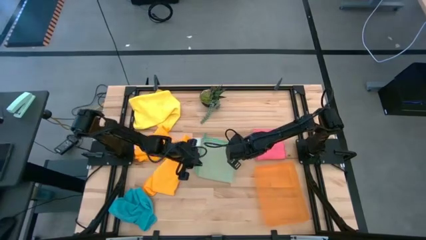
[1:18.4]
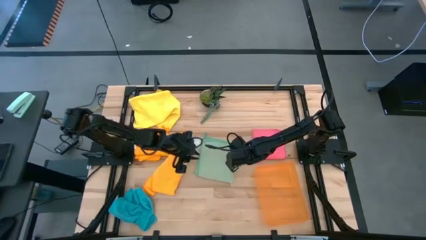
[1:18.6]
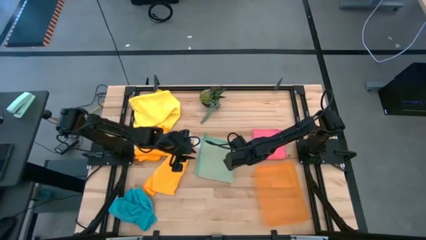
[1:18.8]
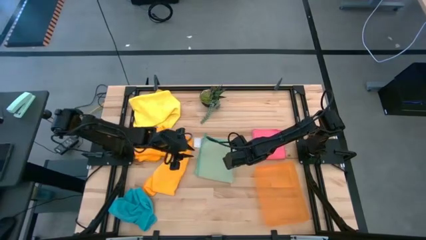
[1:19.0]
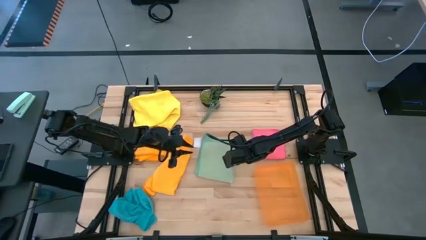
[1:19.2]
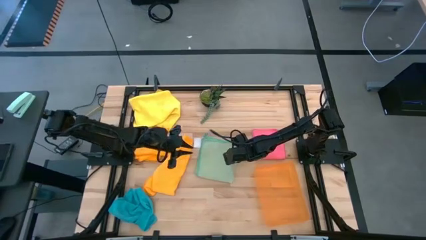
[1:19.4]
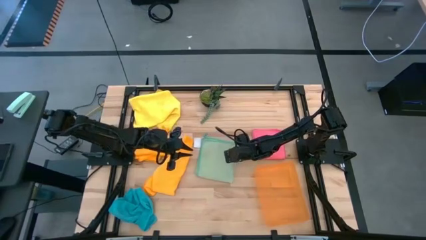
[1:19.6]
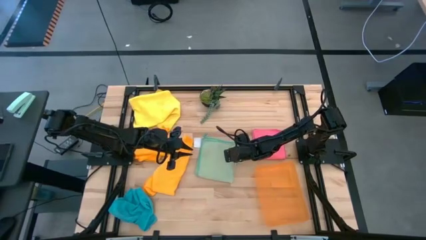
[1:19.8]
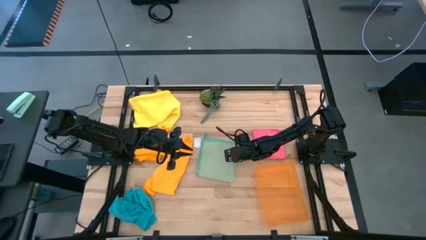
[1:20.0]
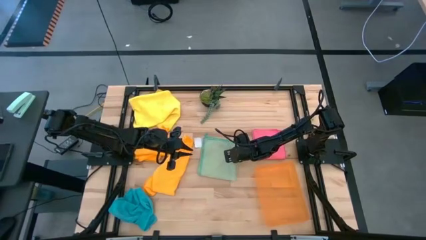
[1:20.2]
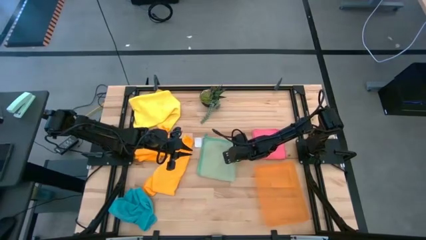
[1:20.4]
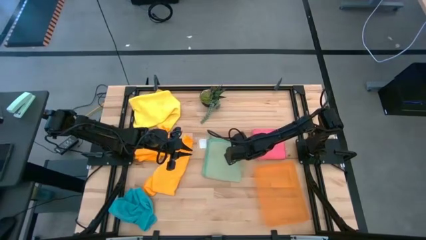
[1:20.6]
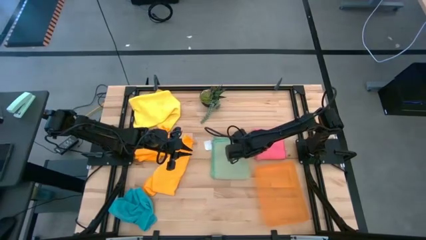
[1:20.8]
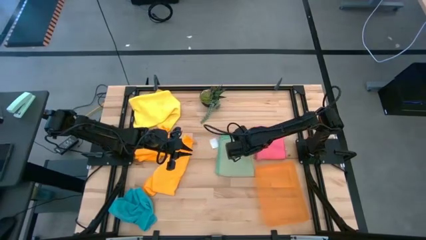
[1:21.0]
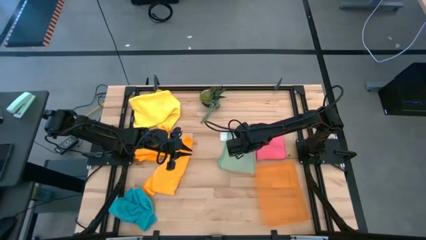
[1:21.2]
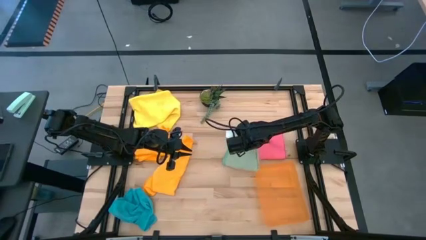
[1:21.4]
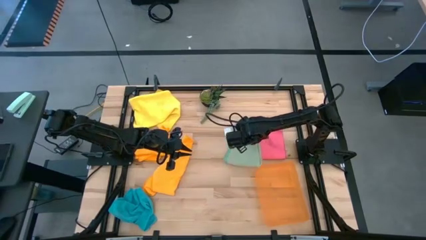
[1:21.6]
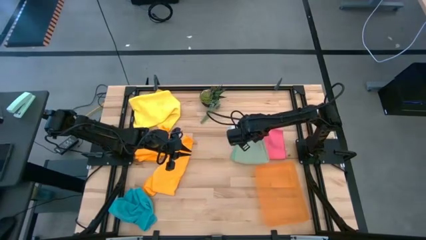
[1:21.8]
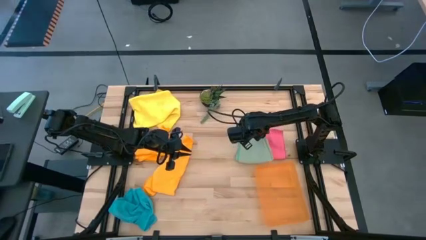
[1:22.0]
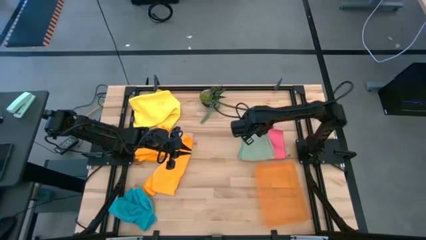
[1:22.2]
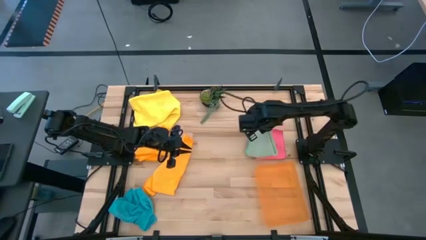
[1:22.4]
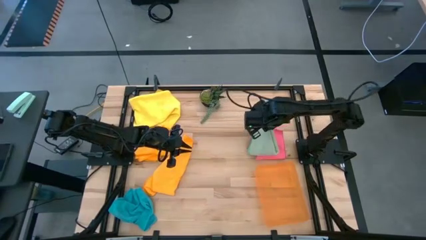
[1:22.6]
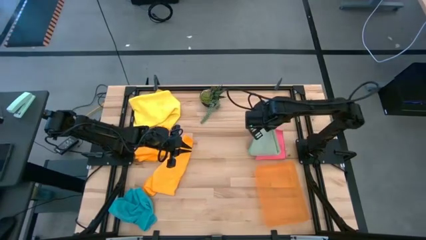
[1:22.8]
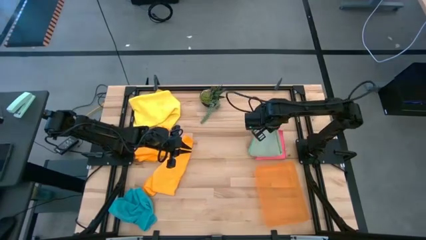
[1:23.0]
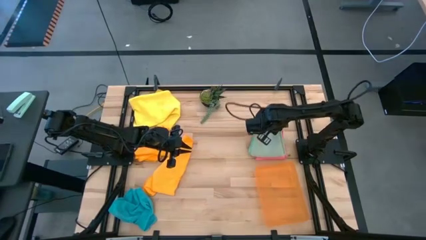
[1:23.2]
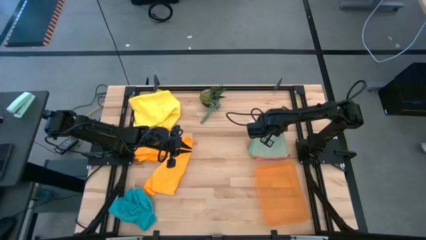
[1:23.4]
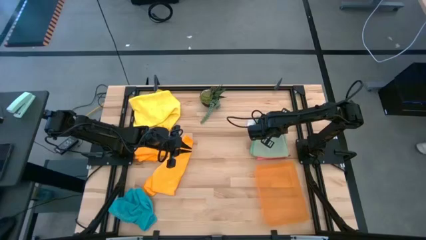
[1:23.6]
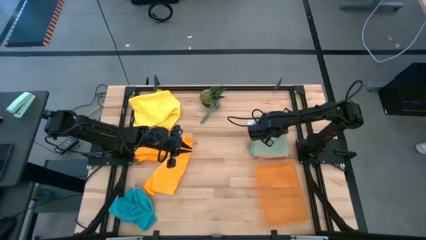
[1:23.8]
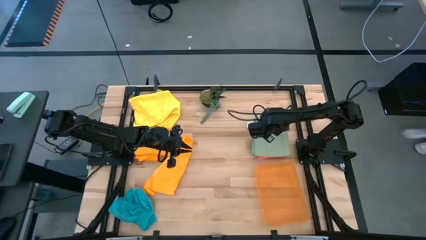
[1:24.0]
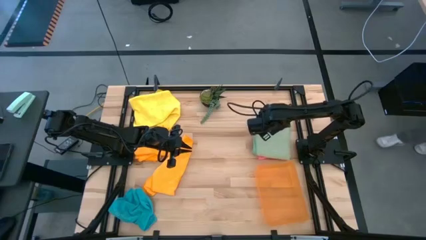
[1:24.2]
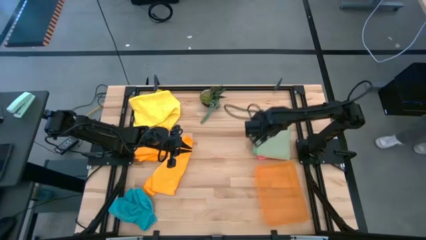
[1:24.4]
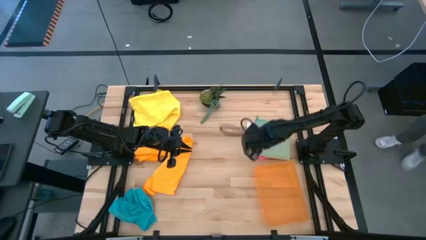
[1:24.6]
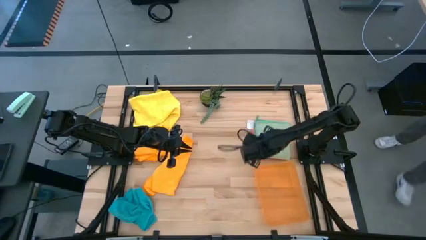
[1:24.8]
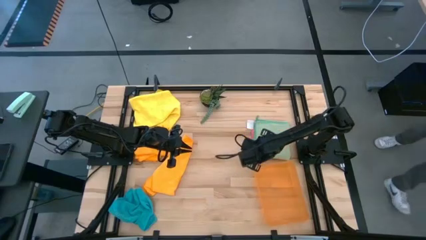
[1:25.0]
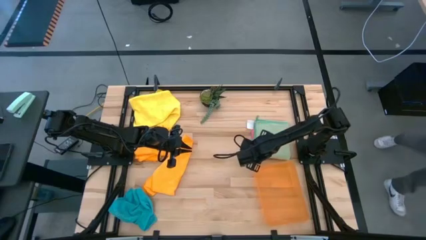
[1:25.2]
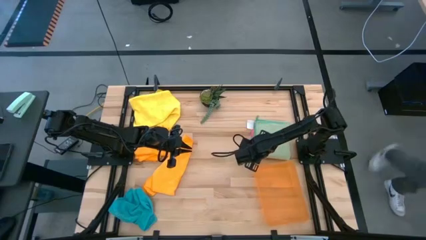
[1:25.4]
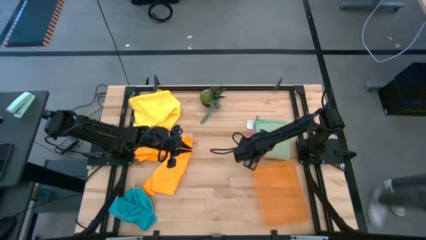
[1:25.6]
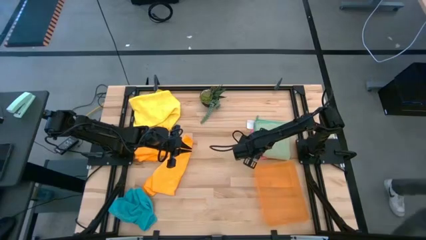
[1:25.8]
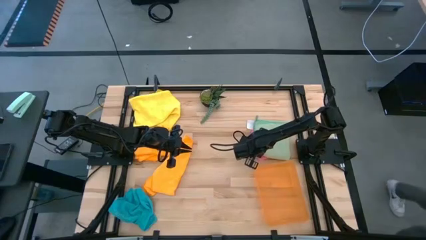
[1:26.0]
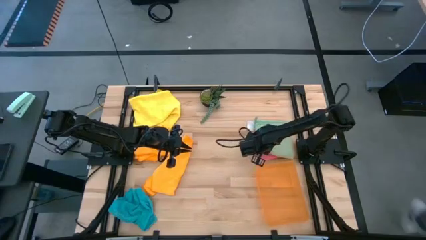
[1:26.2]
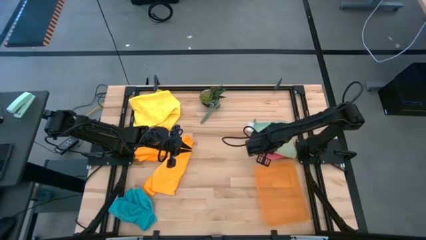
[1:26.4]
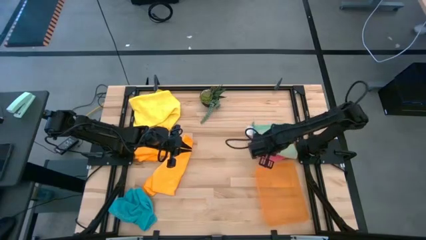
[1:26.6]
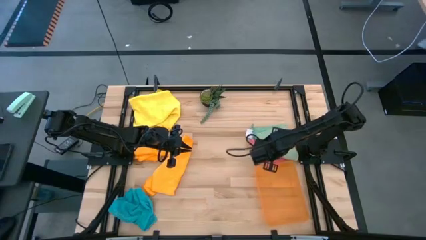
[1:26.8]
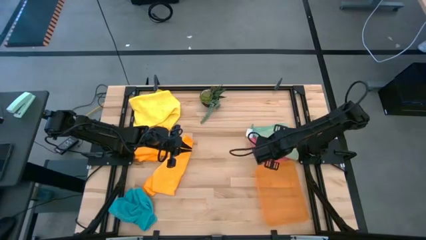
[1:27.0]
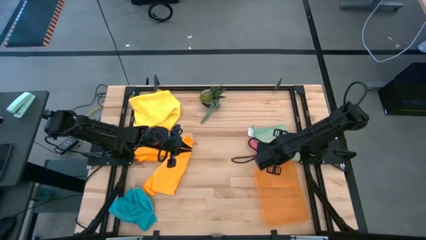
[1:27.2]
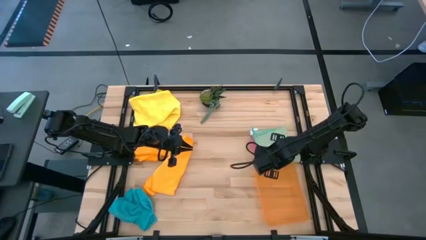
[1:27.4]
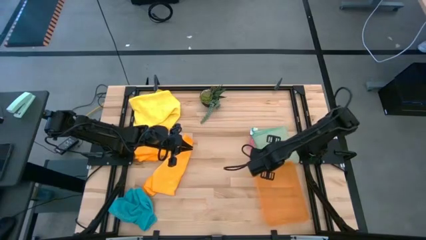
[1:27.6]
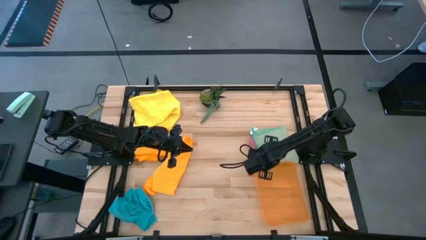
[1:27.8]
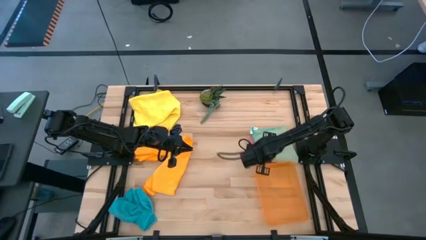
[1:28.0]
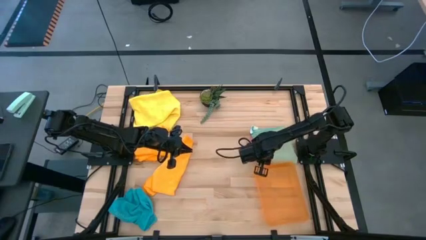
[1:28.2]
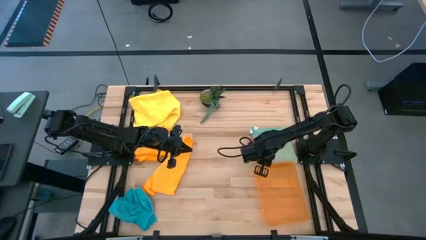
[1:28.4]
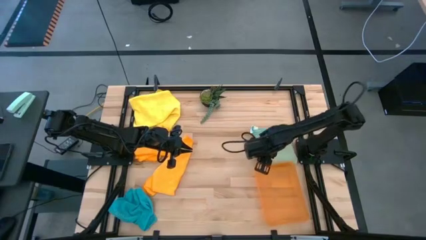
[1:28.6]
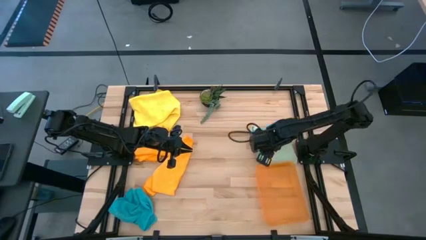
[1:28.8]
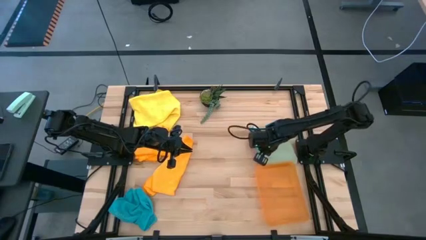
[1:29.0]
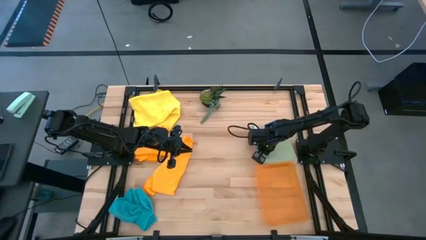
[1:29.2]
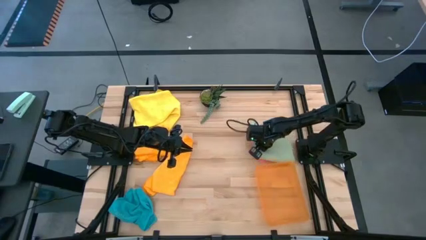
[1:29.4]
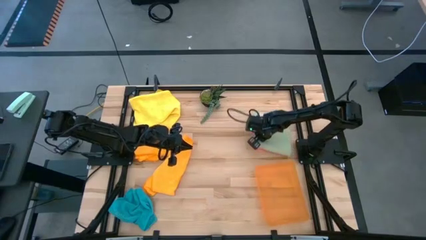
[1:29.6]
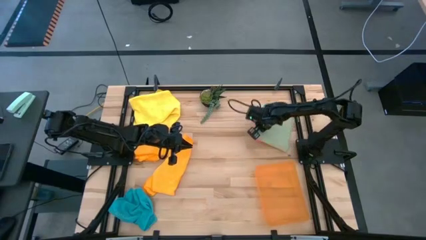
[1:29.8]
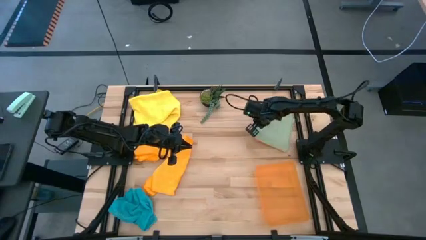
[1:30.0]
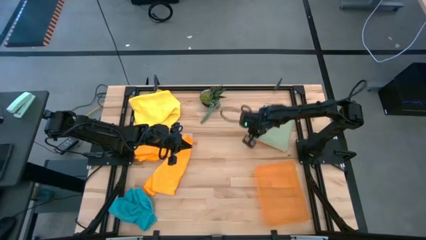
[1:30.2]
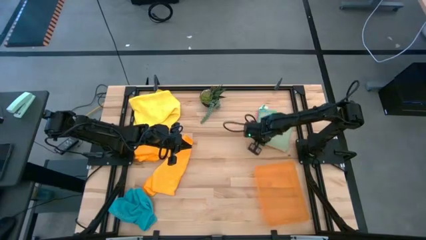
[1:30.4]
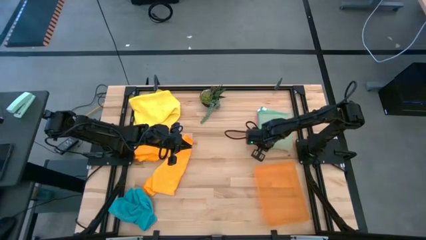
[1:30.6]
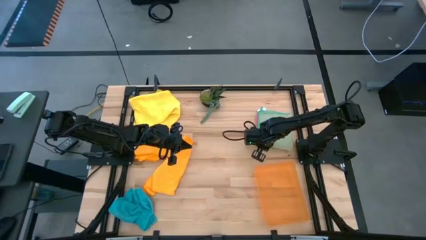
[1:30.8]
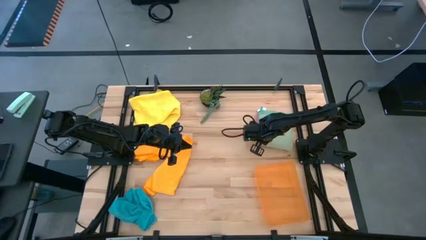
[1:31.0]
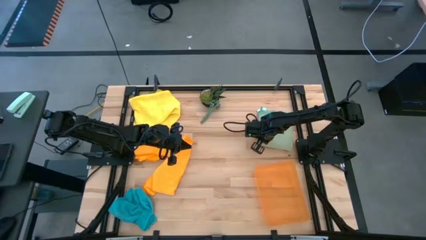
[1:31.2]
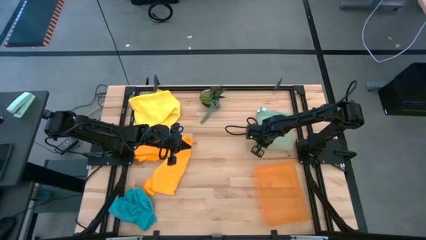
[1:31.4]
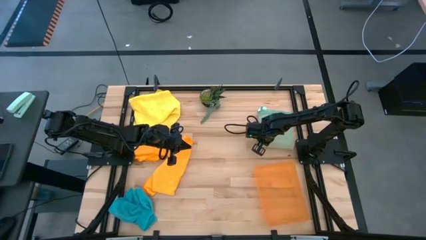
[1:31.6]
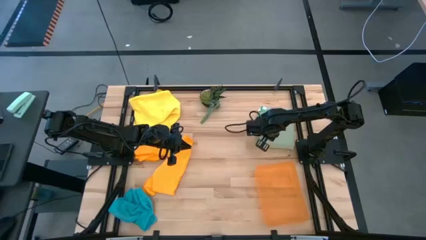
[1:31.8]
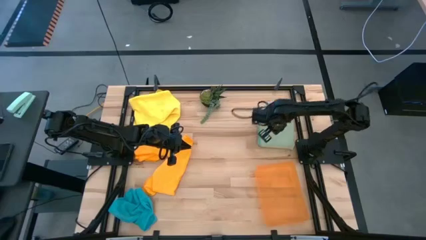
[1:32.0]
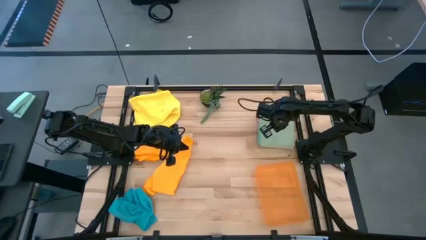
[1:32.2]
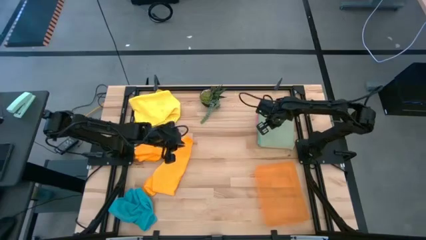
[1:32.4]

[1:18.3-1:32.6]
Task: Fold microfiber towels
Stack the green microfiber towel on top of the pink microfiber towel

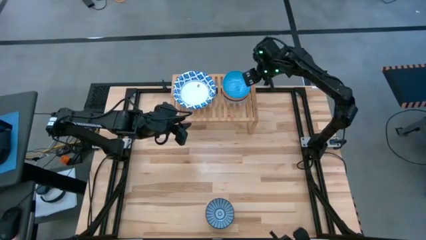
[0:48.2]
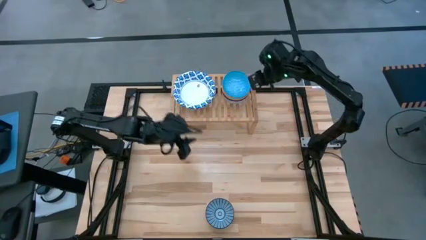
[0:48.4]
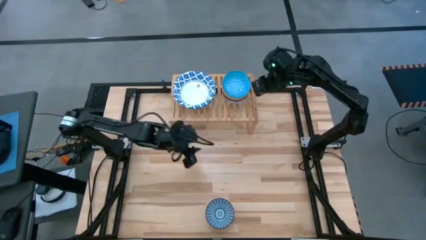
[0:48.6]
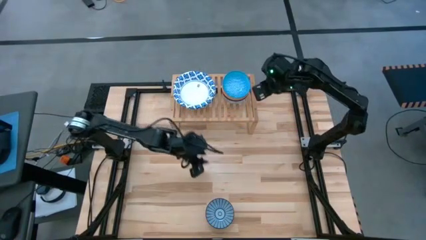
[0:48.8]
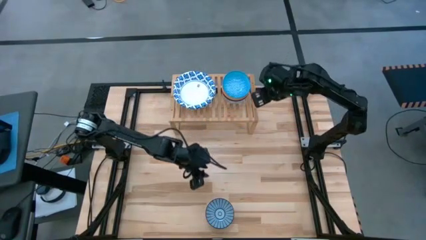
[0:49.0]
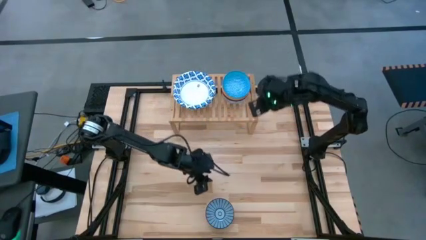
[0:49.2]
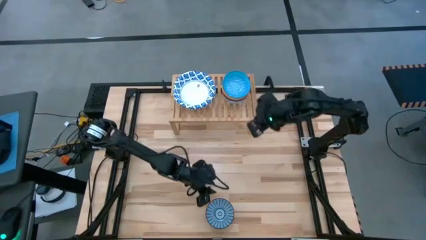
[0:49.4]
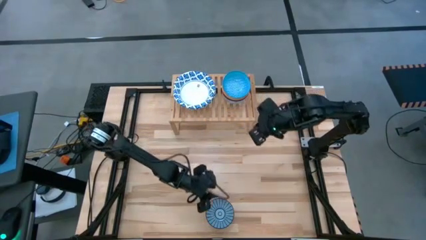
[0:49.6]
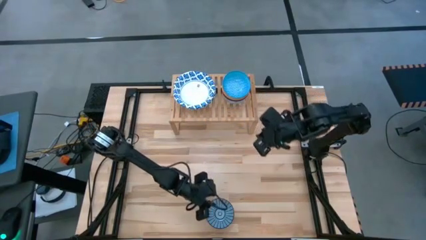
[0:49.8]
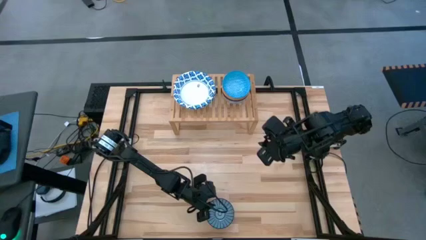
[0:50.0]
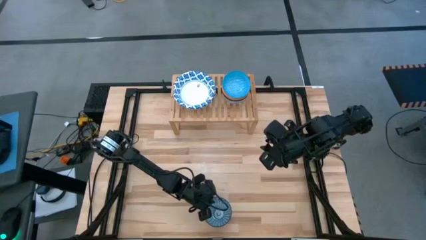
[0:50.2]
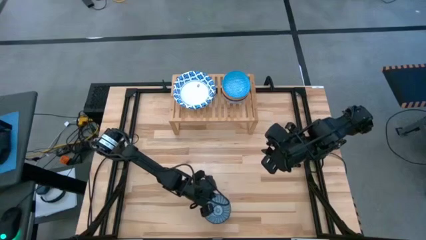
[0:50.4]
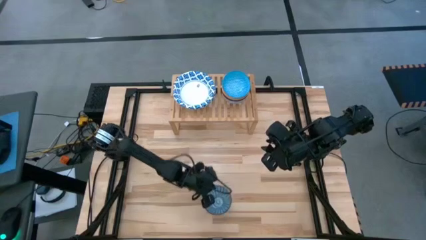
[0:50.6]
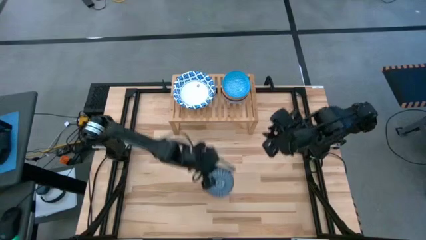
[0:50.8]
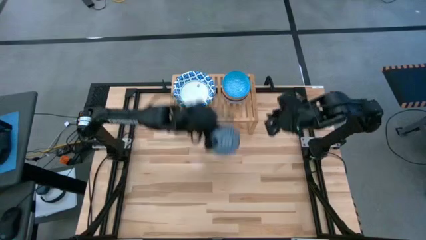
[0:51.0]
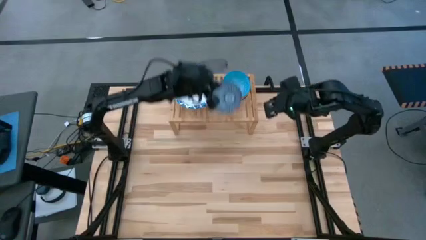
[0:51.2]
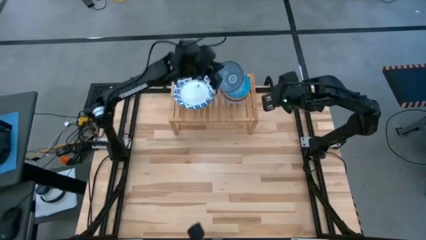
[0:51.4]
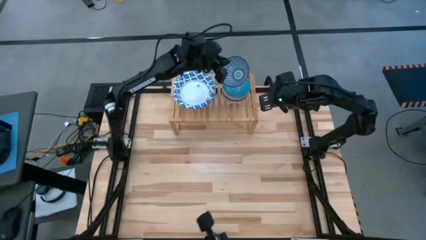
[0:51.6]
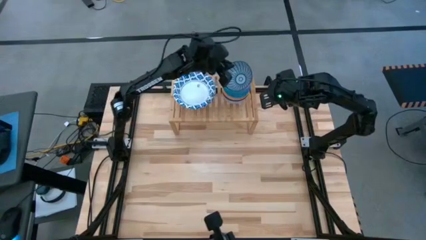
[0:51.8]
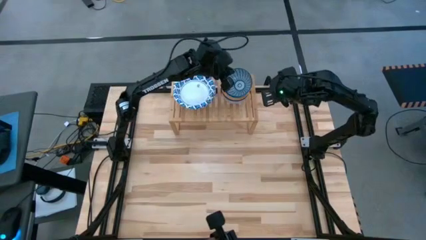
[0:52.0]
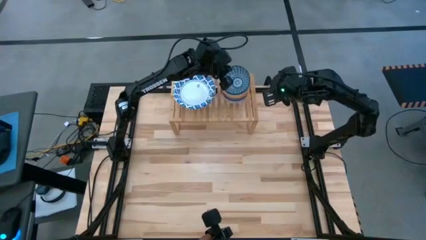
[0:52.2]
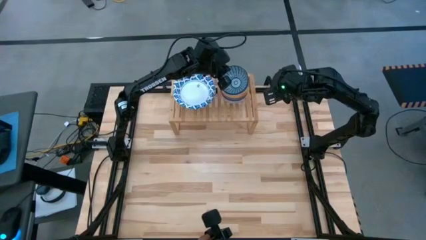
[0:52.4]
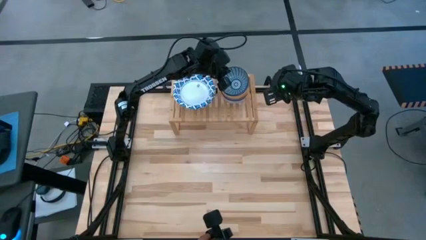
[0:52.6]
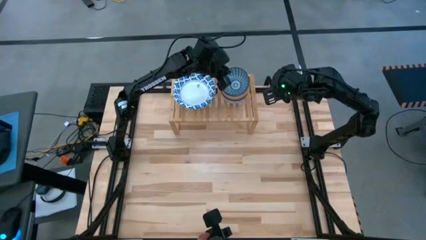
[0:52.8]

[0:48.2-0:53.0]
Task: Place and stack bowls onto a shelf
Stack the small dark blue bowl on top of the small light blue bowl
